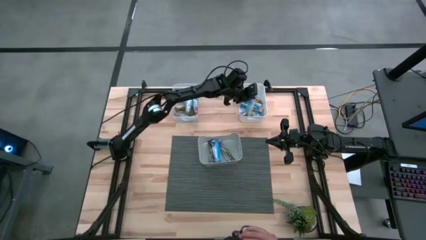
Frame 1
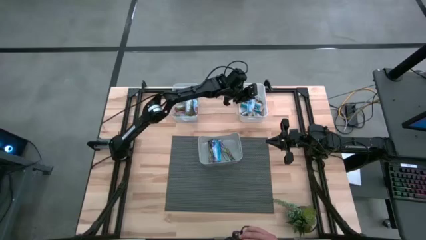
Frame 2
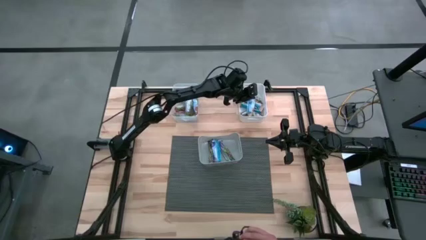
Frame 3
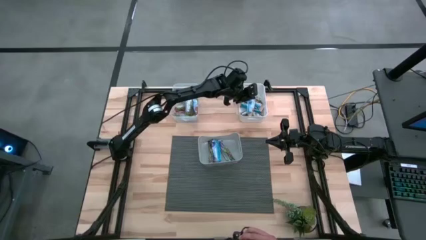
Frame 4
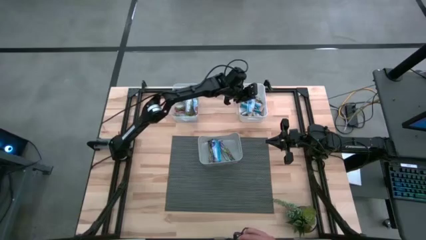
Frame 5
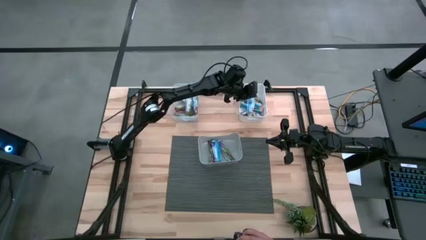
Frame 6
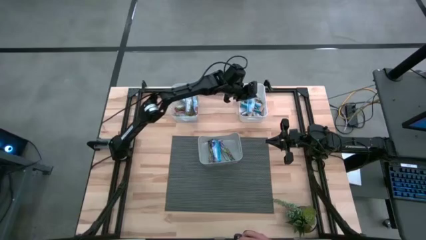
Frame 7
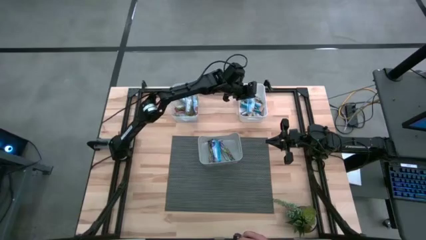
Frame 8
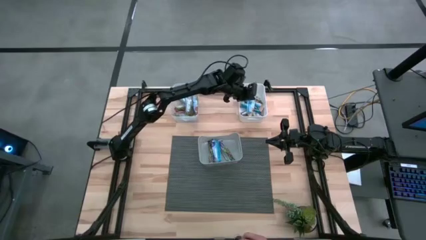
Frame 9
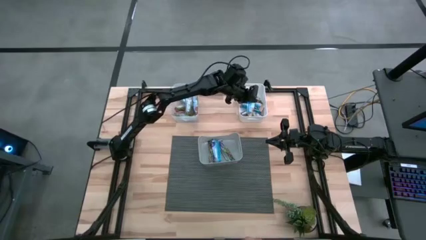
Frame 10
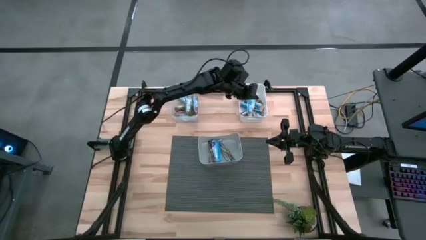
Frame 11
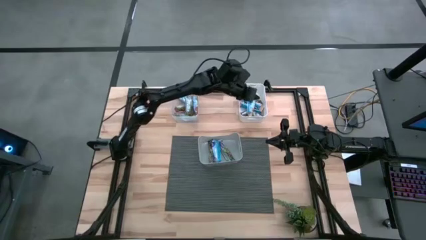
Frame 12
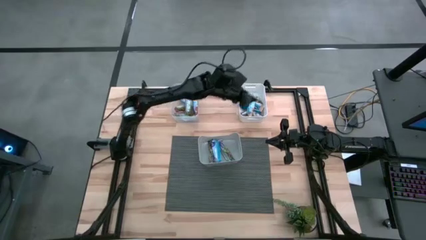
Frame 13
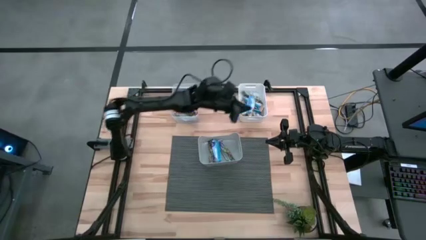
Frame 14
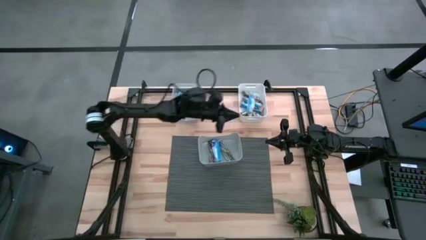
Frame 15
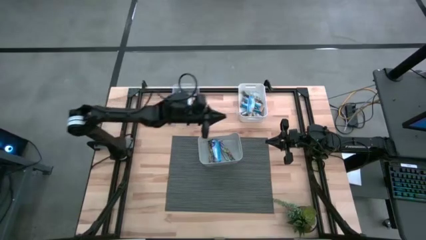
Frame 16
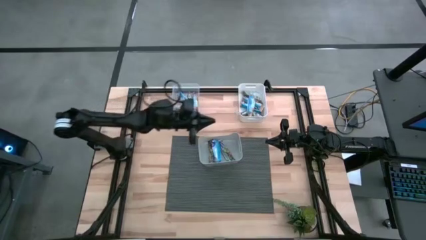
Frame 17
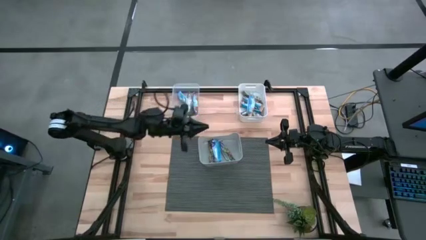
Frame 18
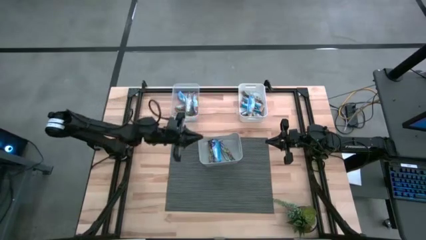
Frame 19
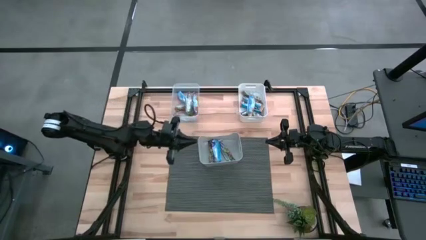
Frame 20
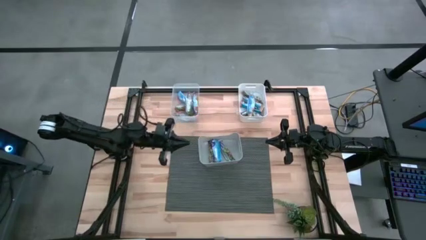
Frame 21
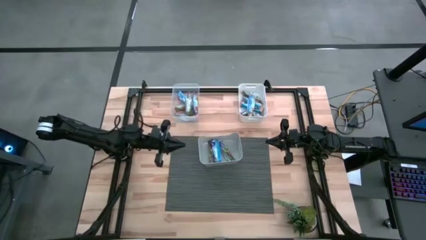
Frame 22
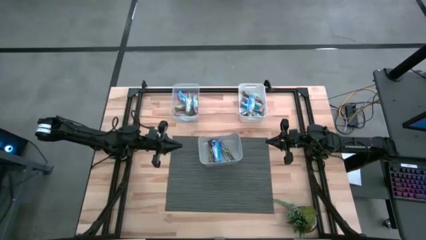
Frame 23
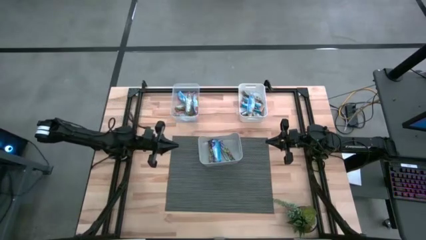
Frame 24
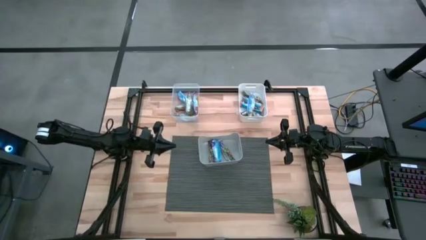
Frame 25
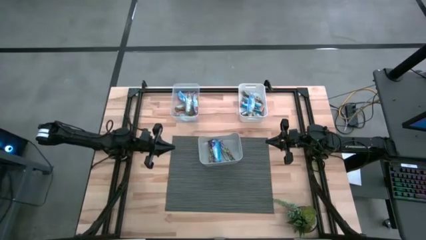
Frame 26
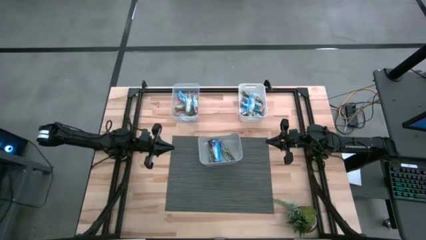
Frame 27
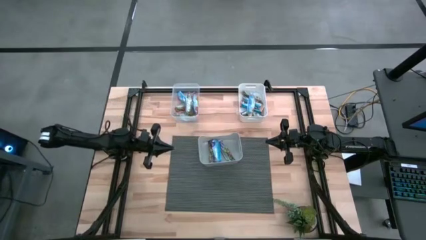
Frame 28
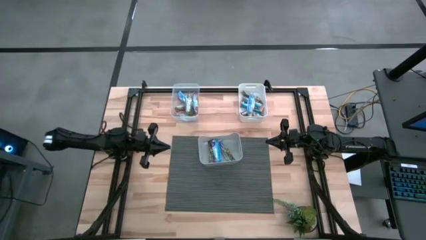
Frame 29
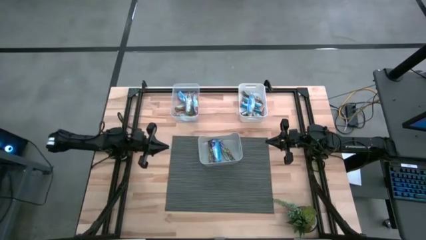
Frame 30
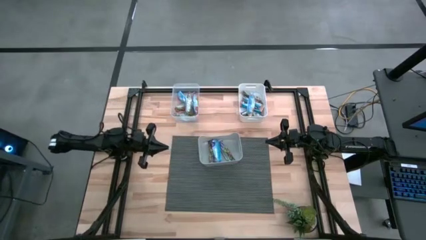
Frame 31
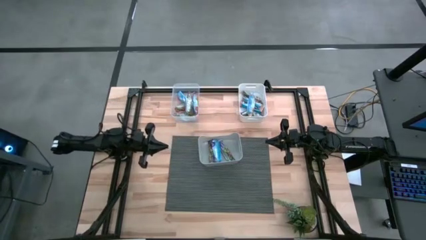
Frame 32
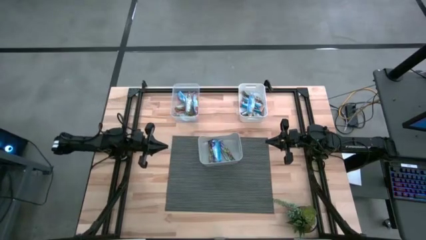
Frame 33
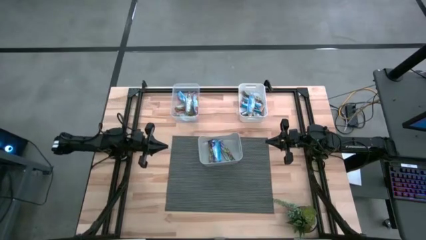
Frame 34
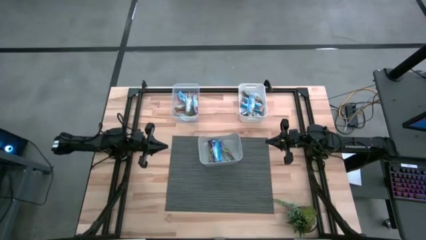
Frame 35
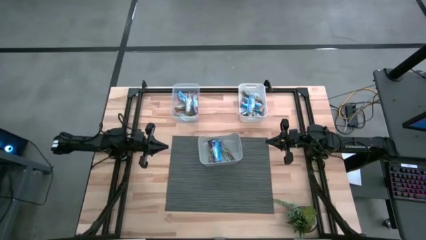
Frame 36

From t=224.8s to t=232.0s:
Task: Pick and place Granola Bars by type
Return to Home Position

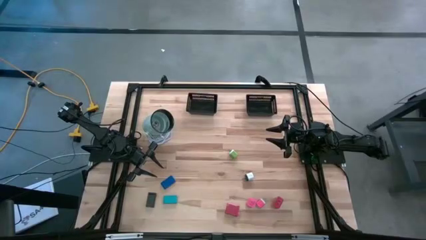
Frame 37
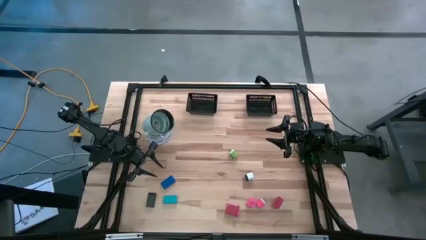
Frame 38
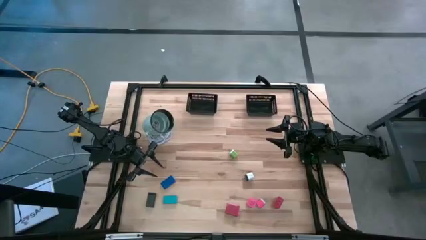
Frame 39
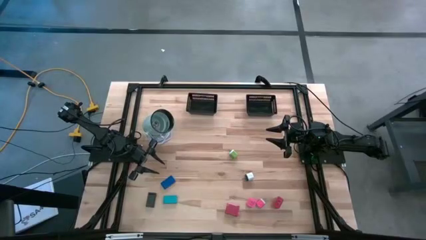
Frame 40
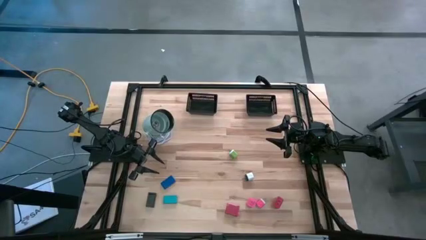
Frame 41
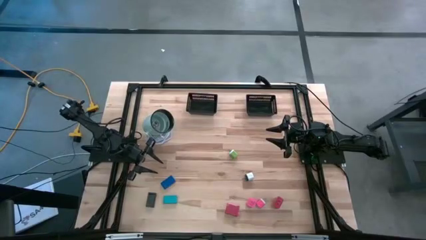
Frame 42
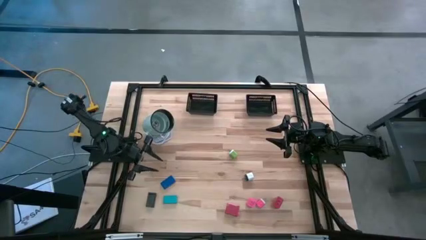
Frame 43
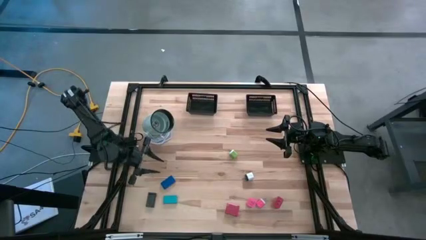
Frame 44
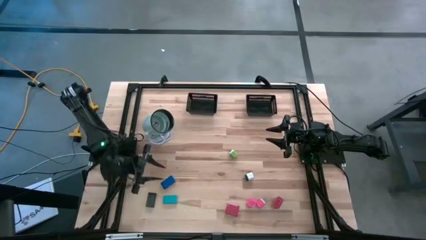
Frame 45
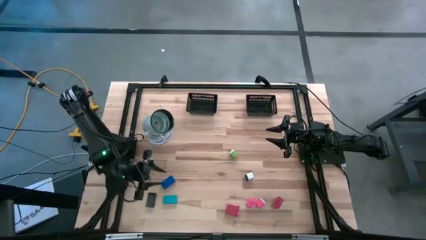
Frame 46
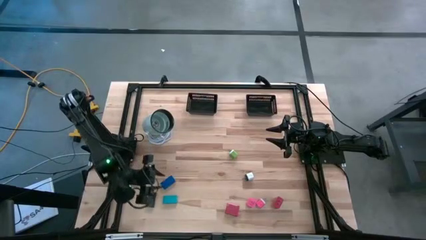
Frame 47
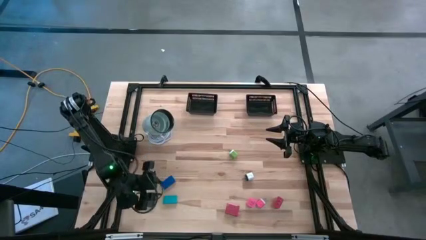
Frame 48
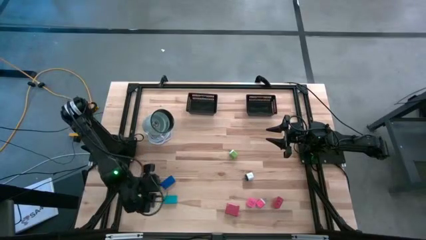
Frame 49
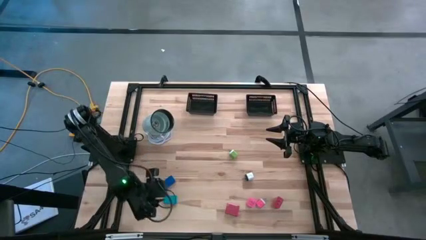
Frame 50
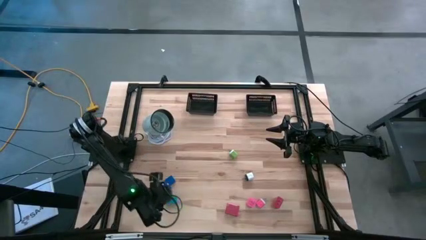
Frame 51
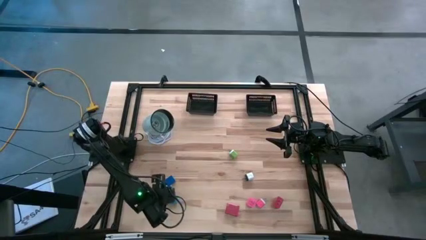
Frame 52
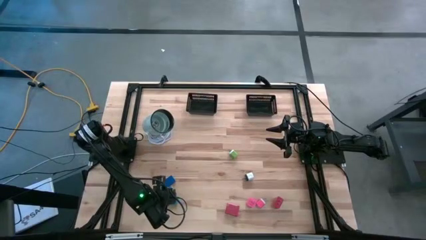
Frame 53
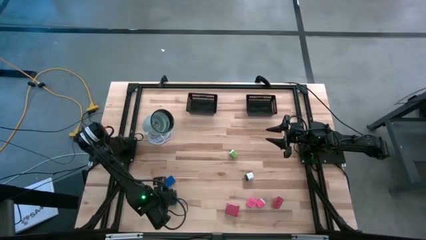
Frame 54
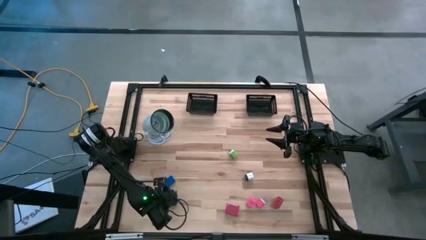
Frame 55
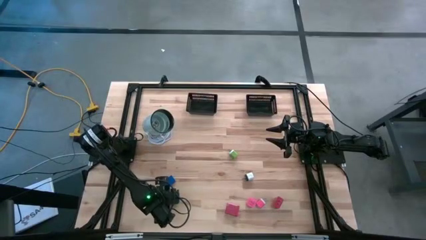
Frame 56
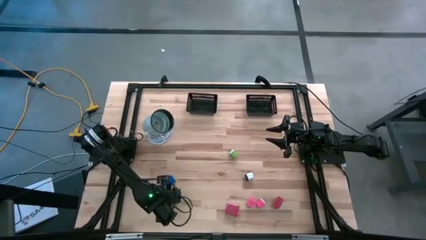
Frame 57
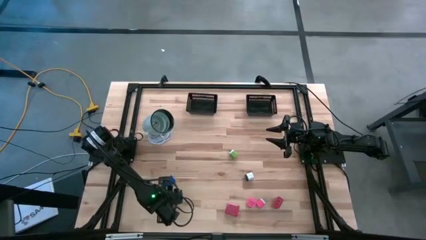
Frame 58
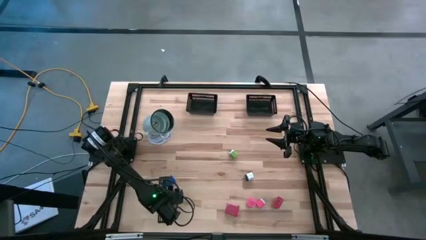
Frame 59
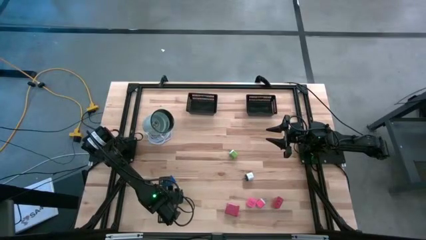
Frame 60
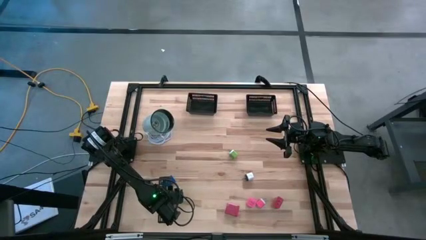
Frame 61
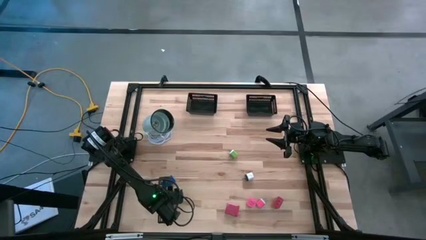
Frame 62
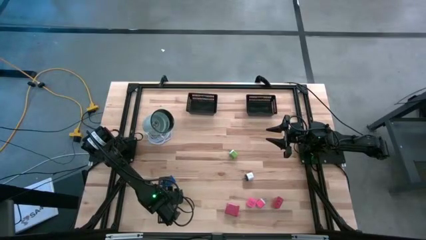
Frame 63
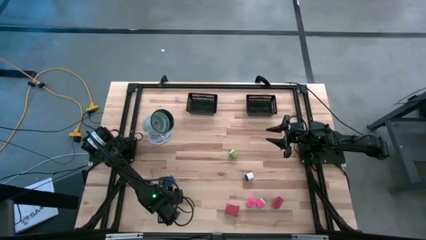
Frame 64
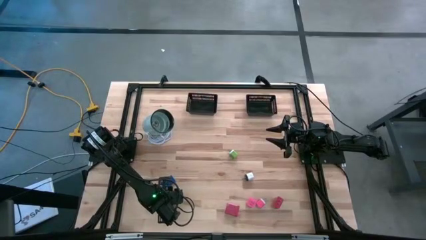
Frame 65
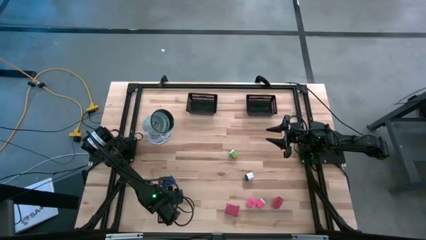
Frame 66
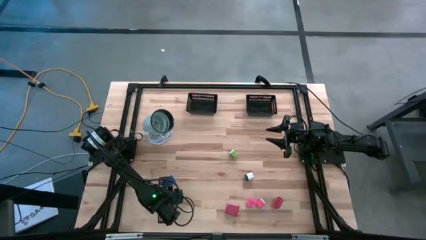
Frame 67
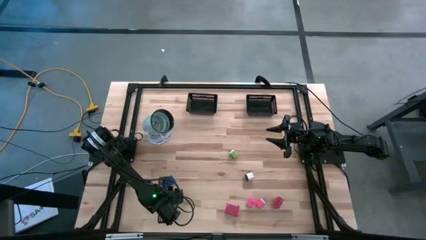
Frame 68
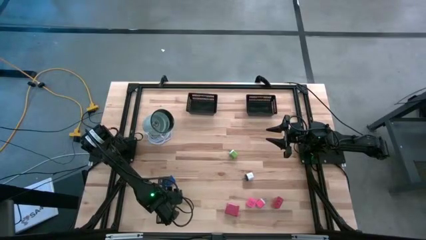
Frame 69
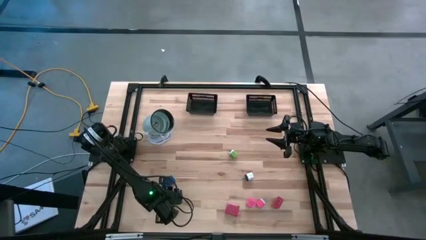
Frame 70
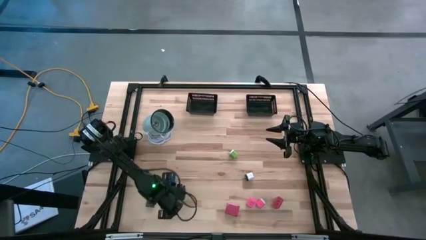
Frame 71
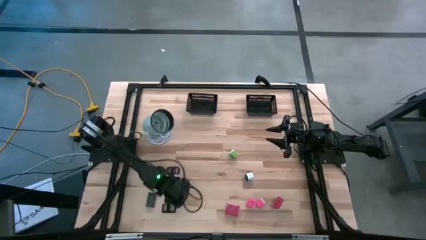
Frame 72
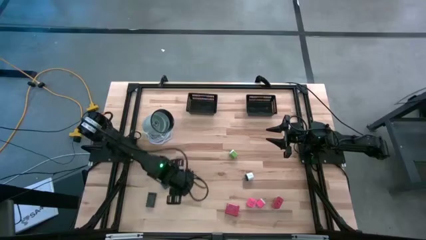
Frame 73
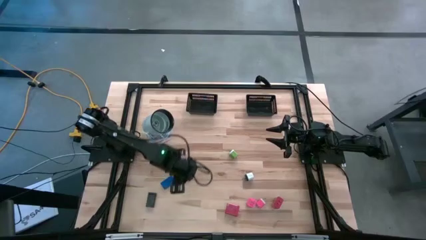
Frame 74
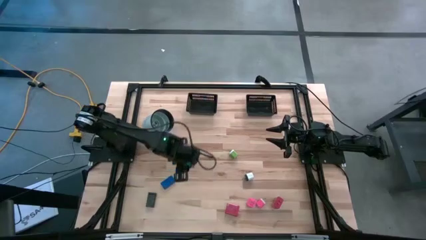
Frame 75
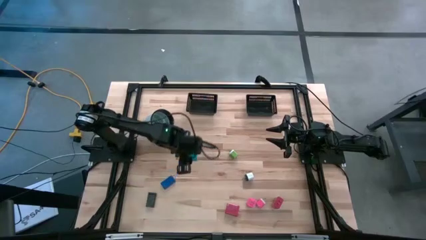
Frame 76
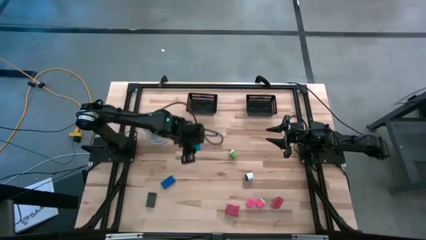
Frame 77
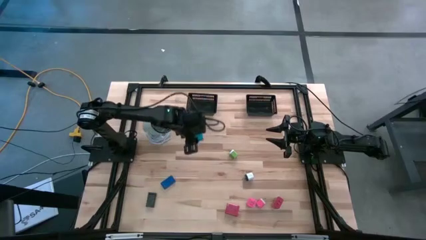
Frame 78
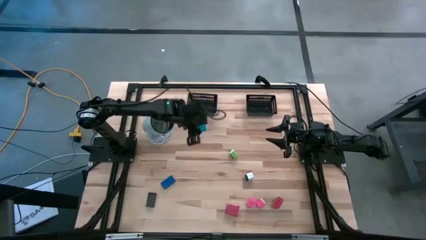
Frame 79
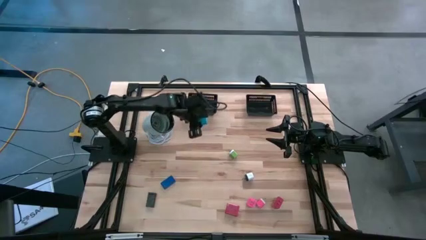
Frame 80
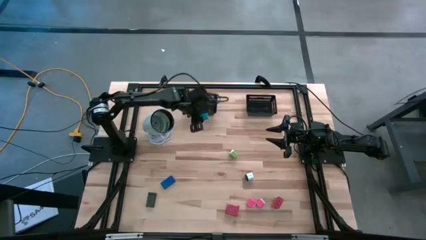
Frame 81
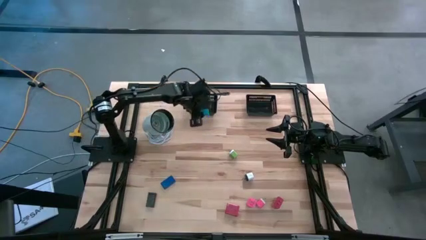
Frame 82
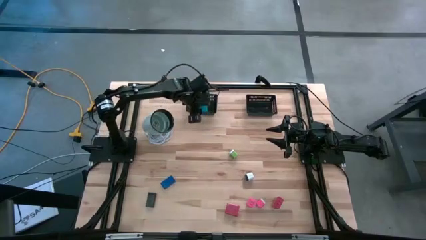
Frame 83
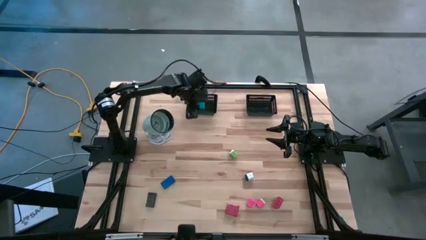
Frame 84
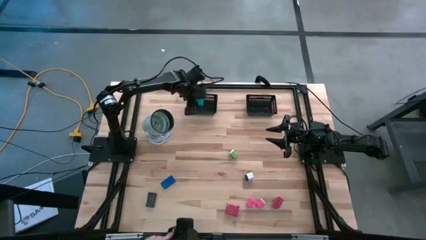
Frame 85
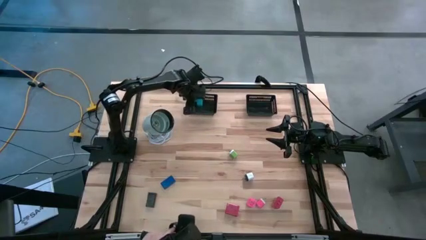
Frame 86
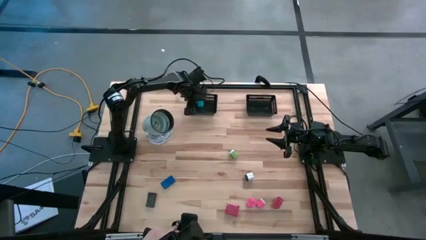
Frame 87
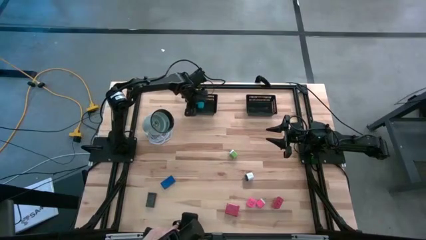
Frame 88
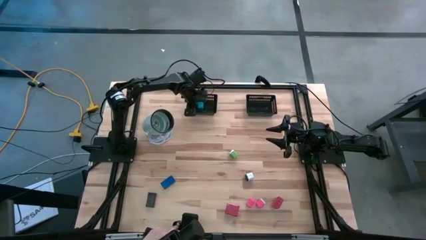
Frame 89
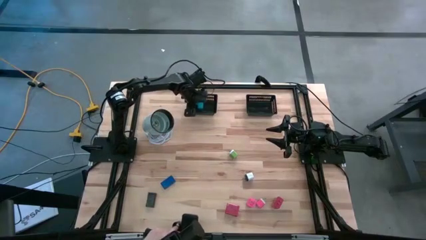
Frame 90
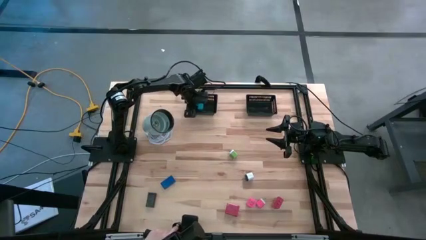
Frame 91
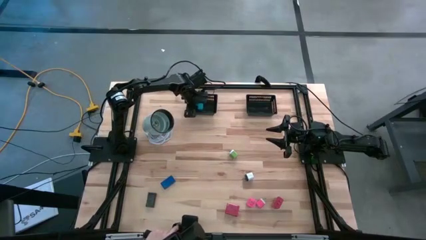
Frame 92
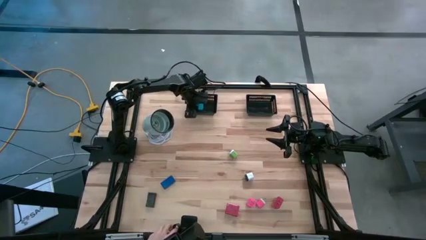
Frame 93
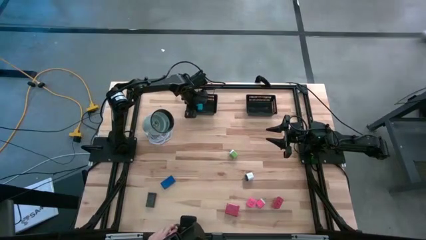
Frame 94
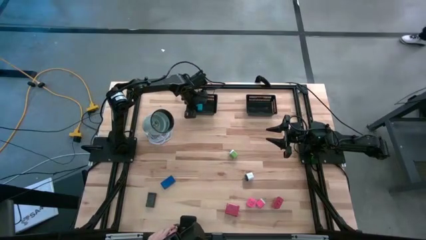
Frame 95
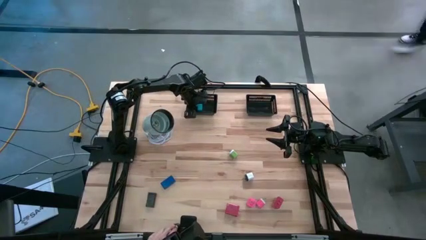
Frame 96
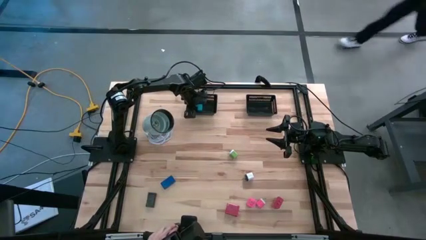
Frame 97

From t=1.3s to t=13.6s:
Task: Pick & Place Office items
Put the light blue digital clock into the left black bin
